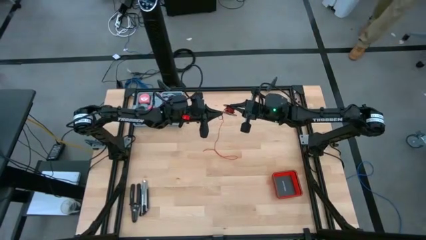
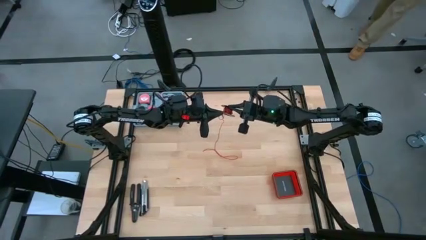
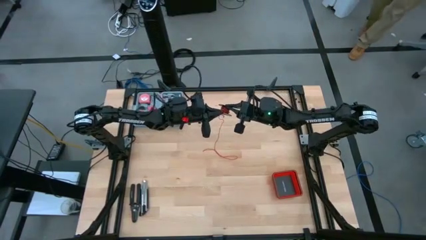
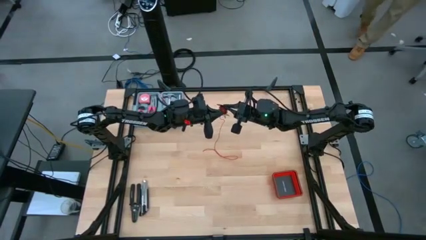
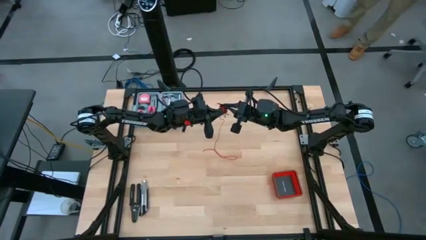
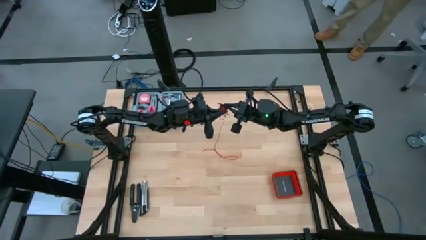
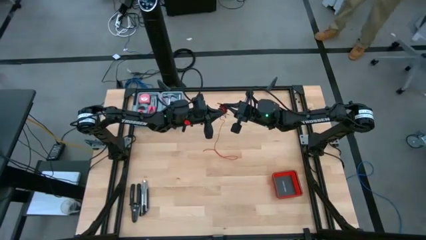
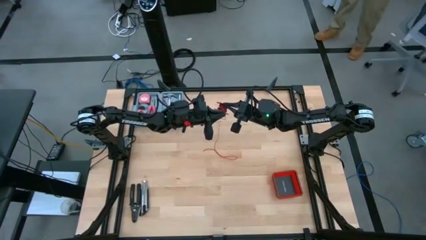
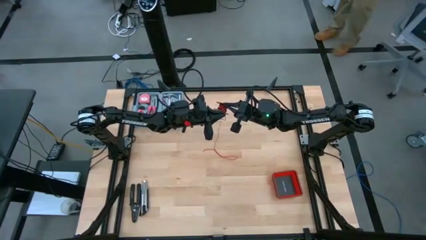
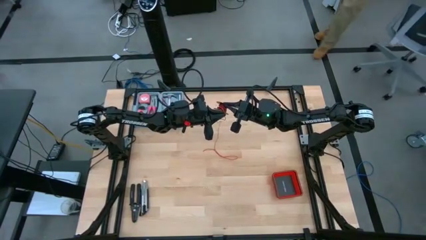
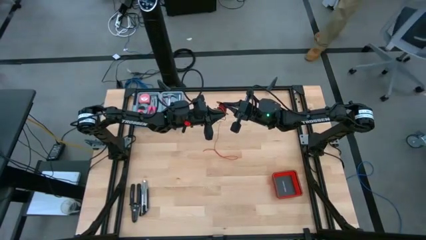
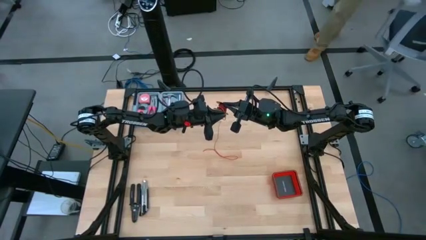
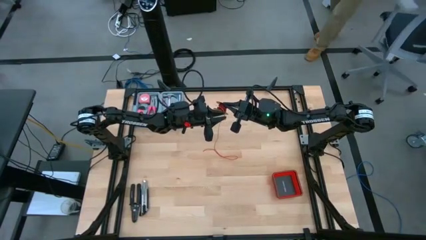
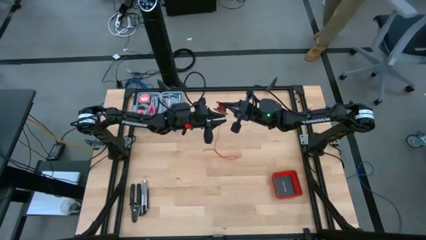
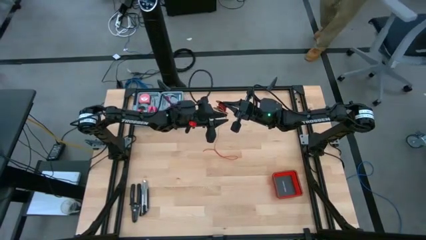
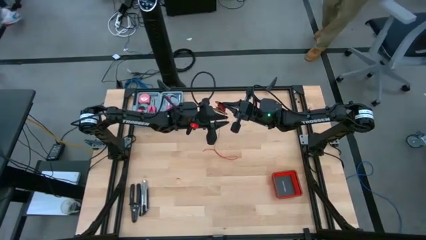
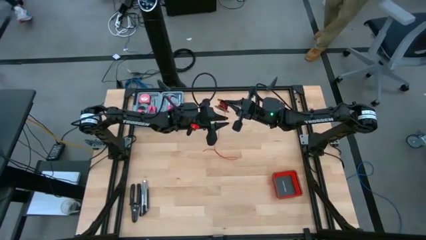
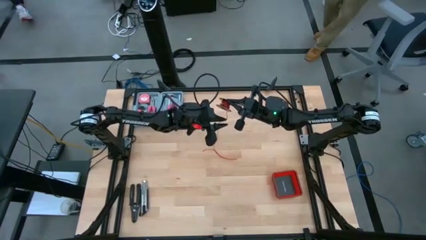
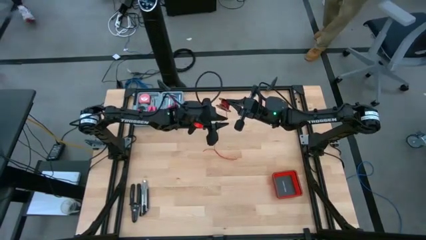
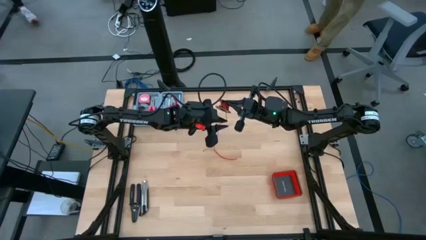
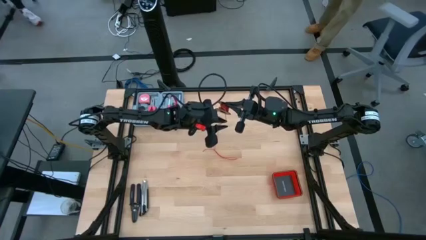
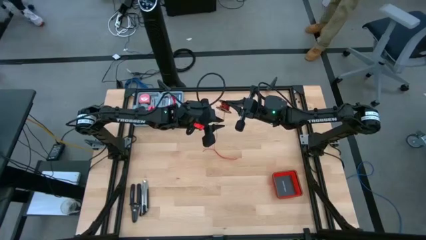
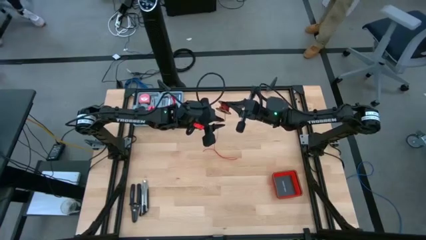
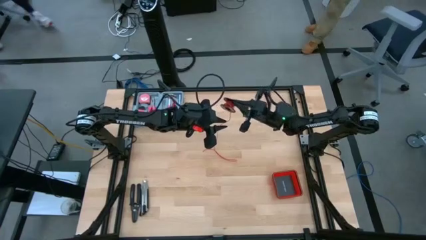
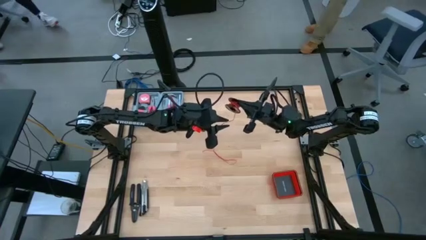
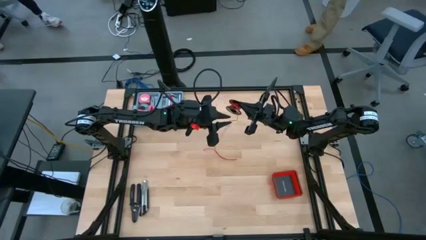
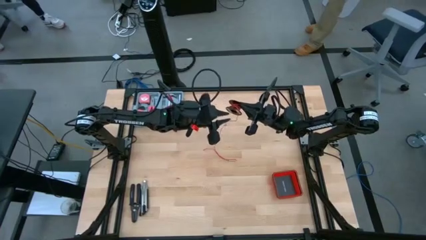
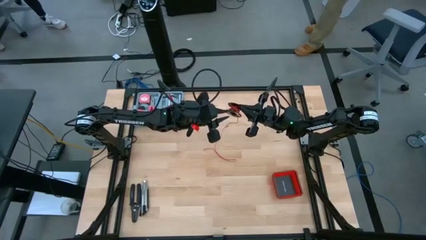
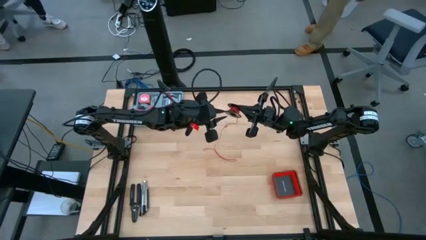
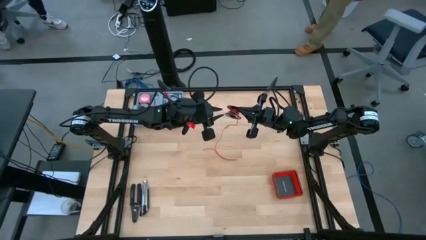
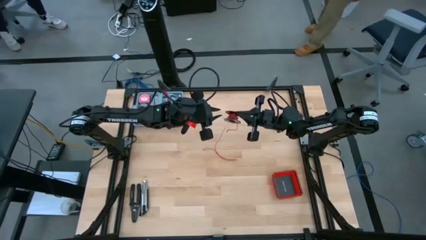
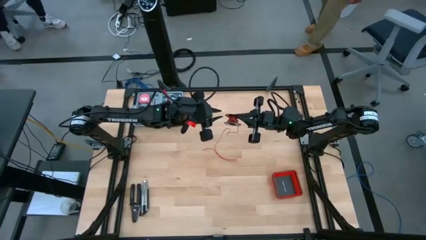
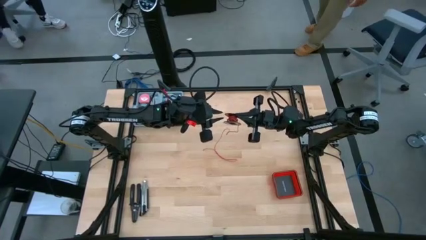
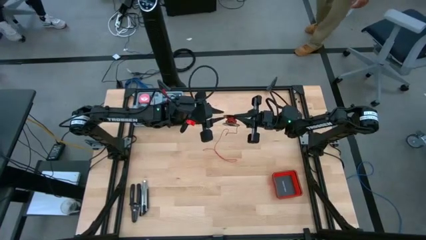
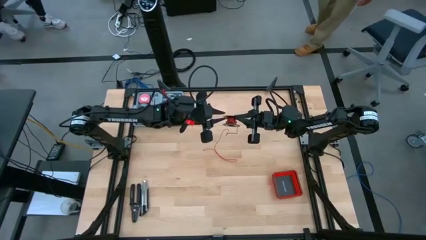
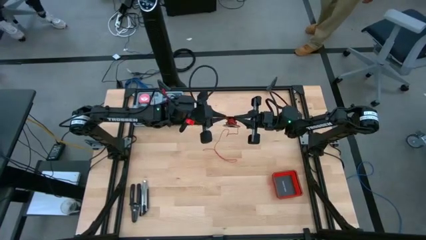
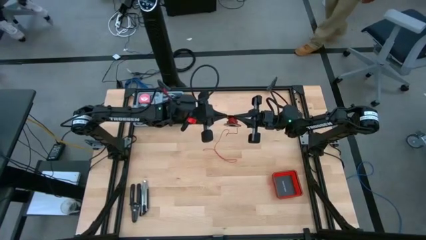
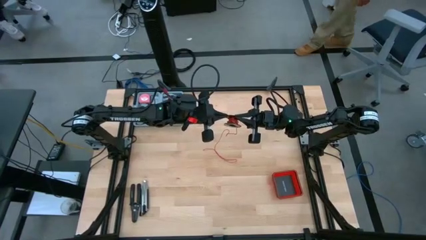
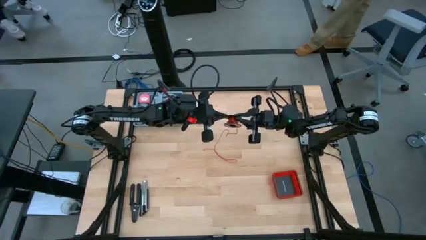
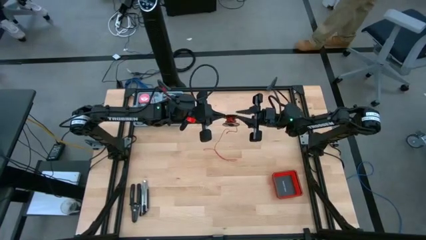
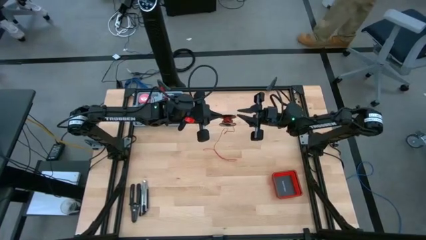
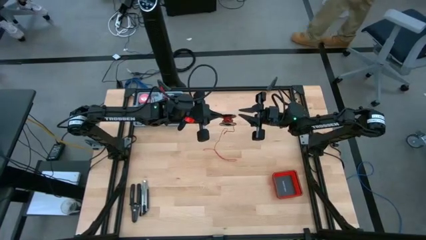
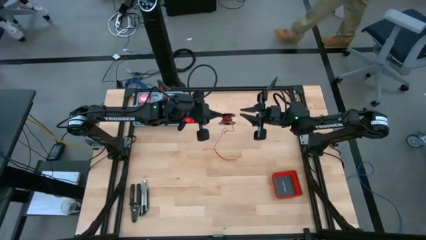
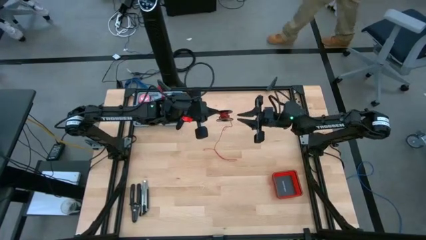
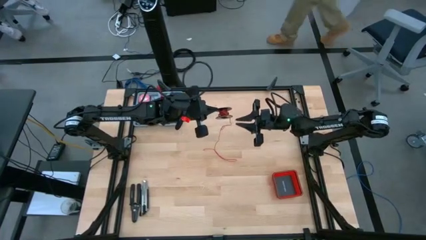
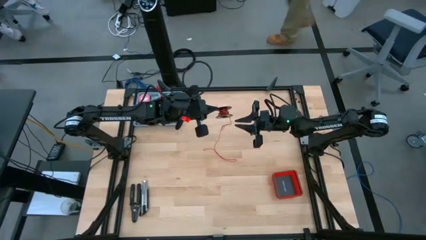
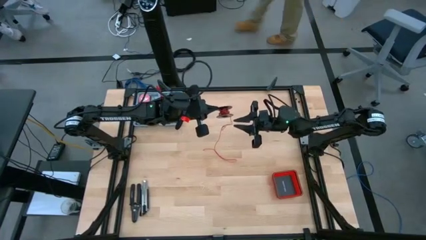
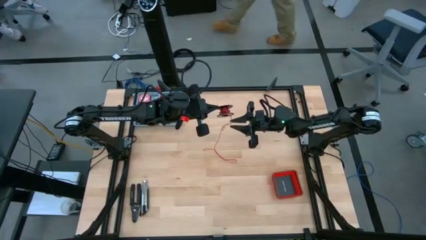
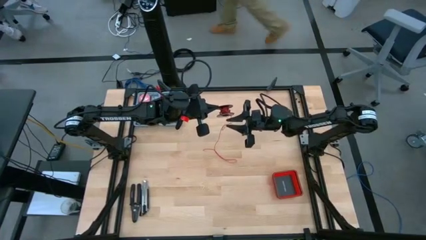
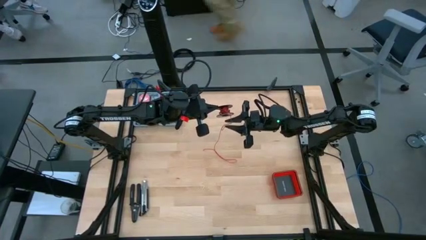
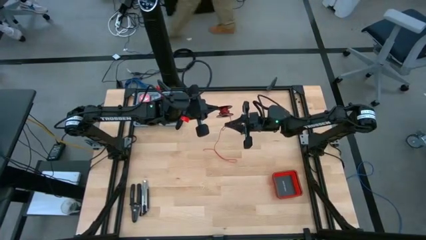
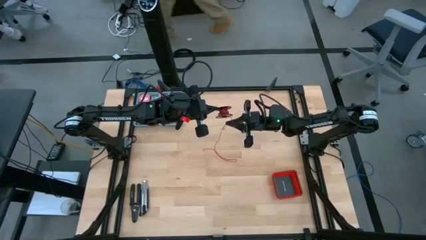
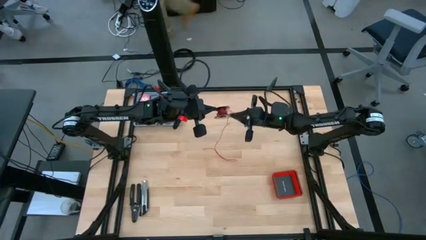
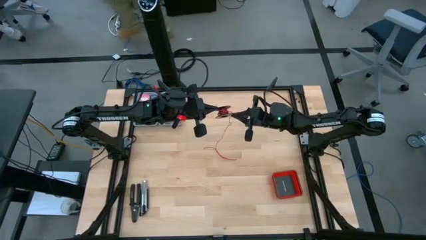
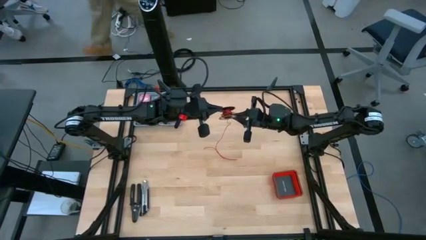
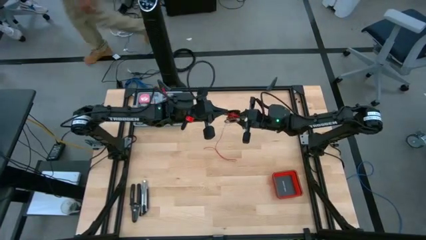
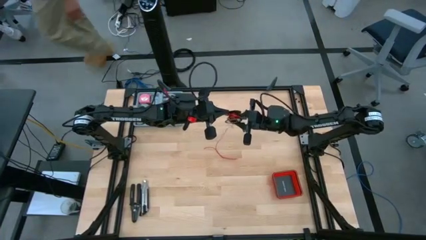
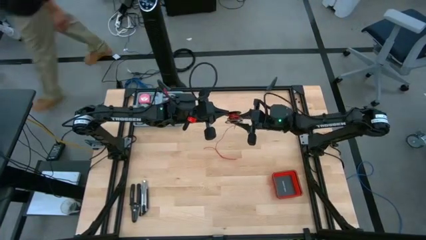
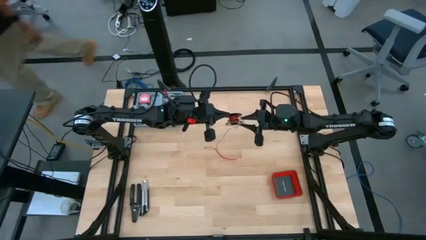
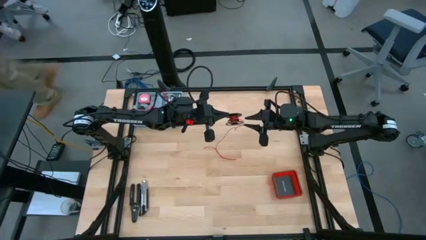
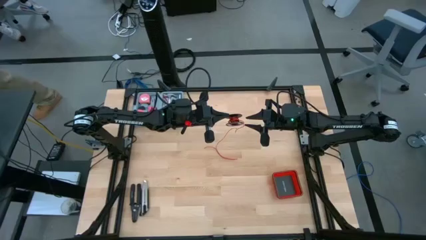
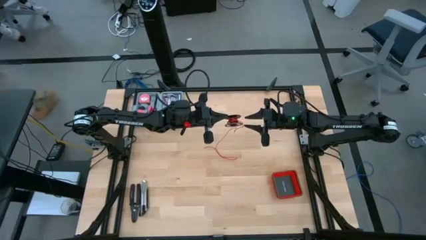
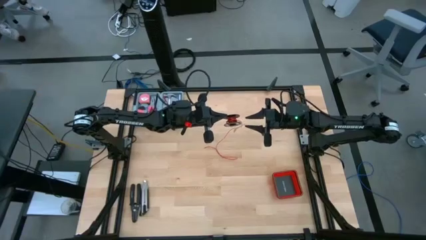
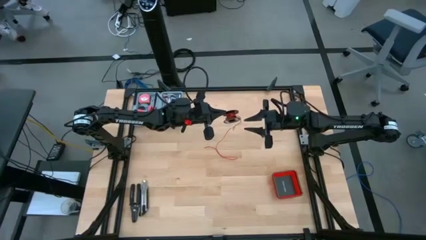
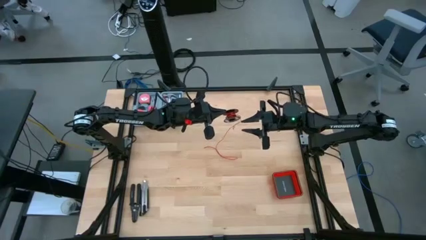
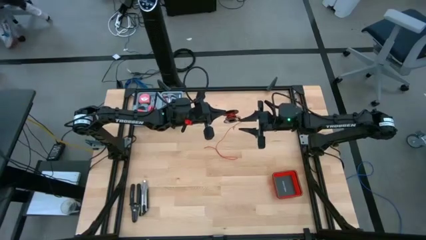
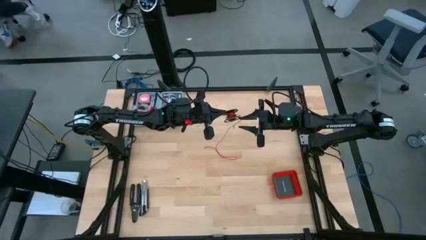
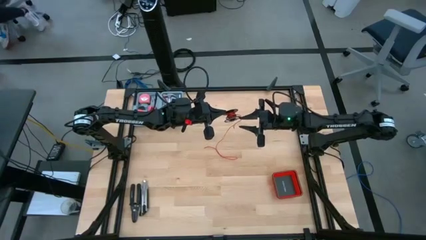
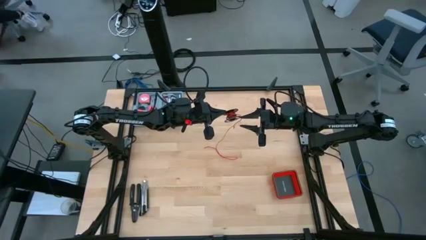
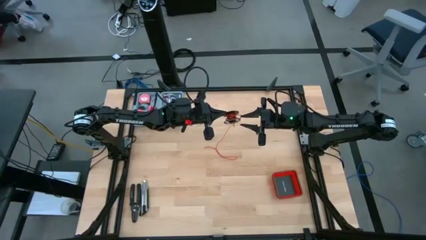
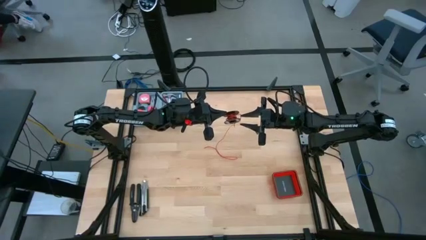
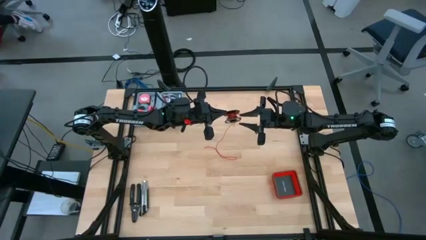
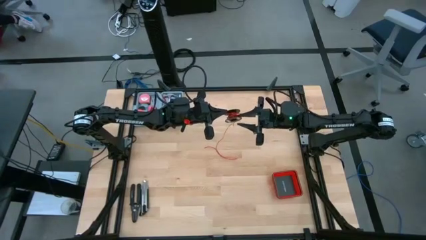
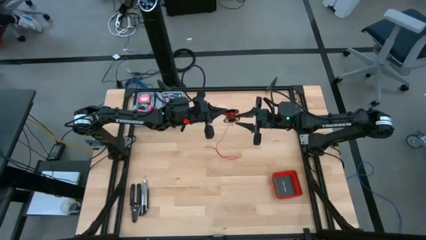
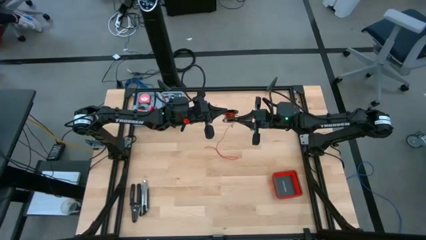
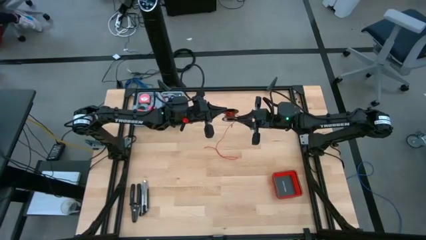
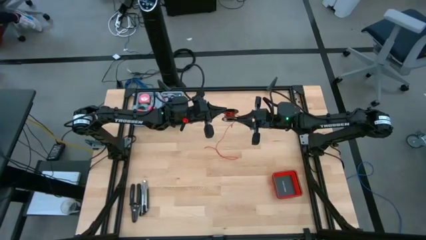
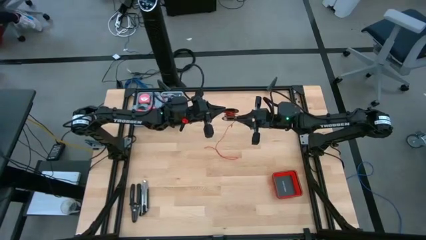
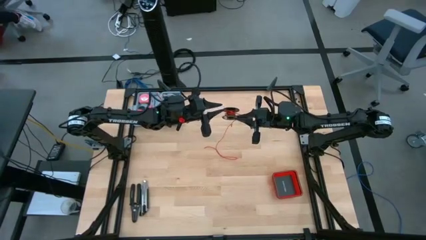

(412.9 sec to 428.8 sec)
Task: Coil cords
Coil the red wire onto the spool
